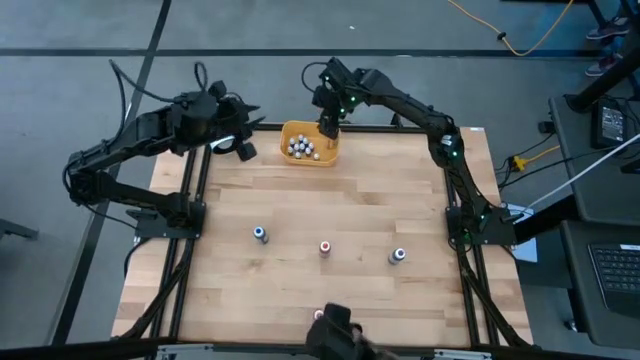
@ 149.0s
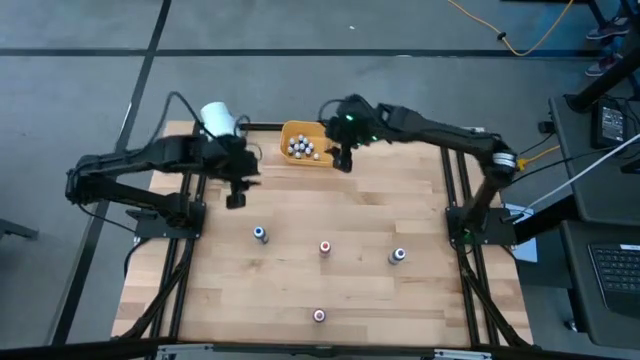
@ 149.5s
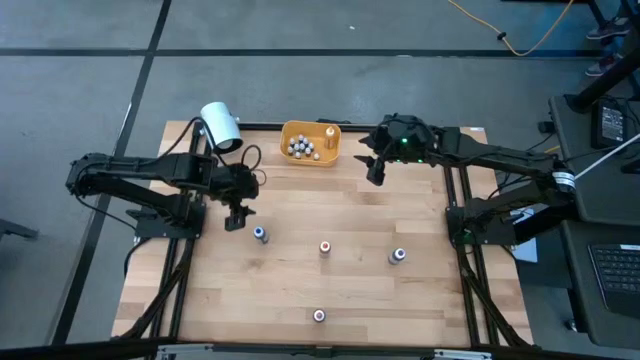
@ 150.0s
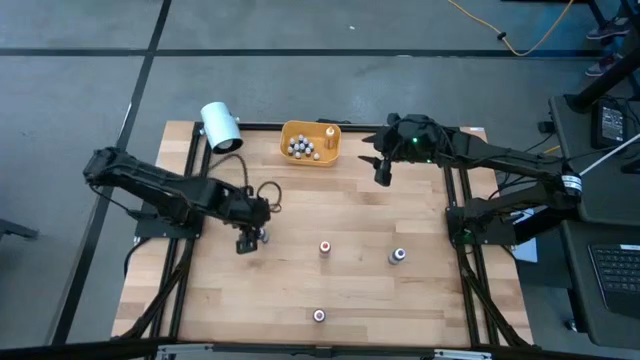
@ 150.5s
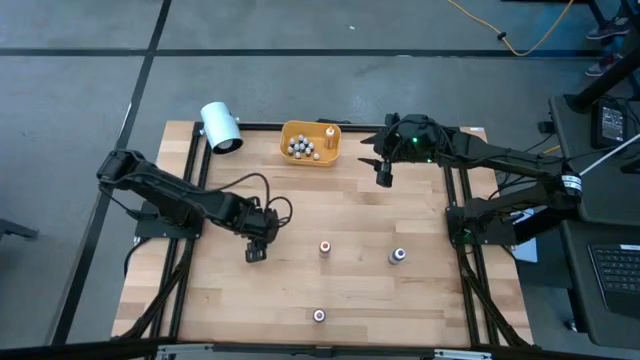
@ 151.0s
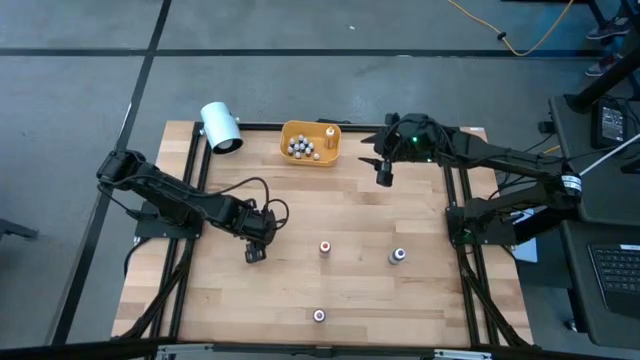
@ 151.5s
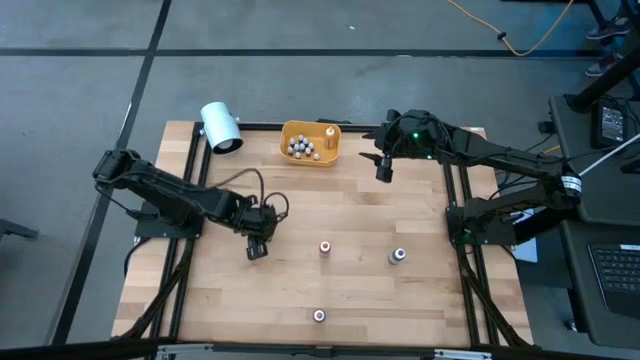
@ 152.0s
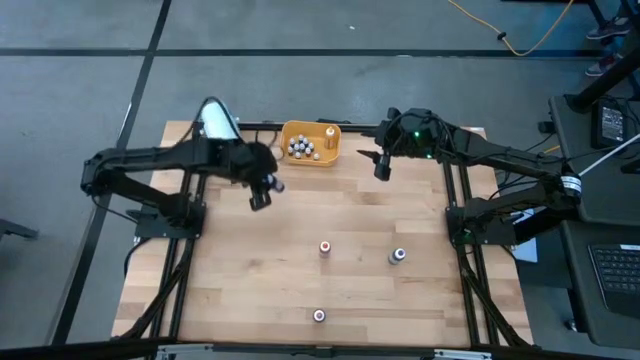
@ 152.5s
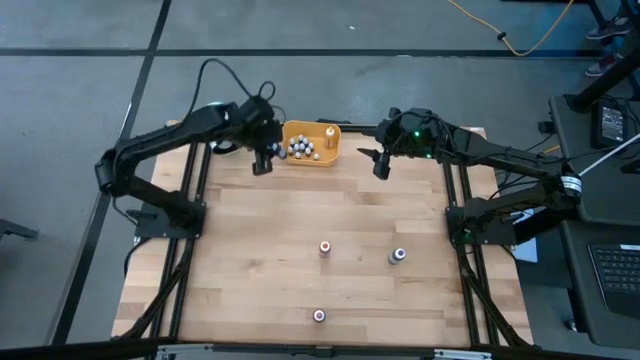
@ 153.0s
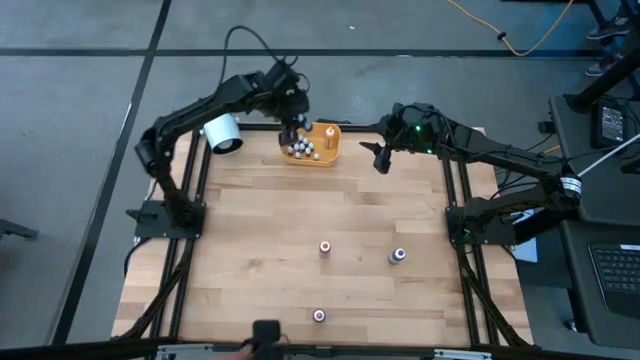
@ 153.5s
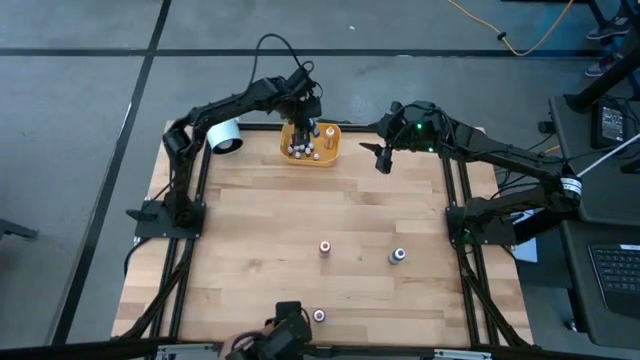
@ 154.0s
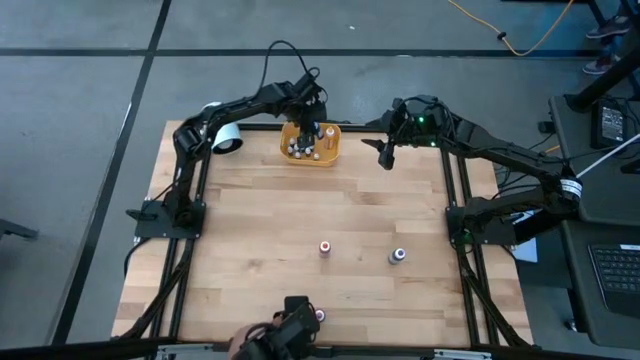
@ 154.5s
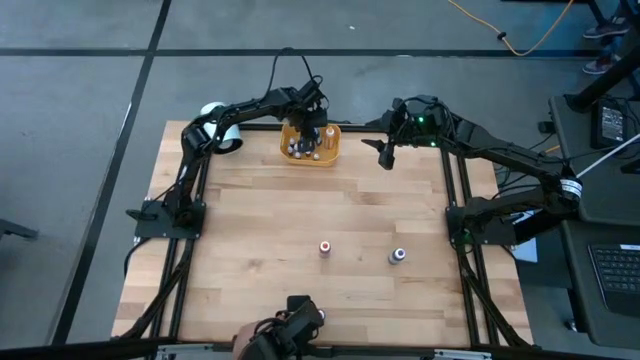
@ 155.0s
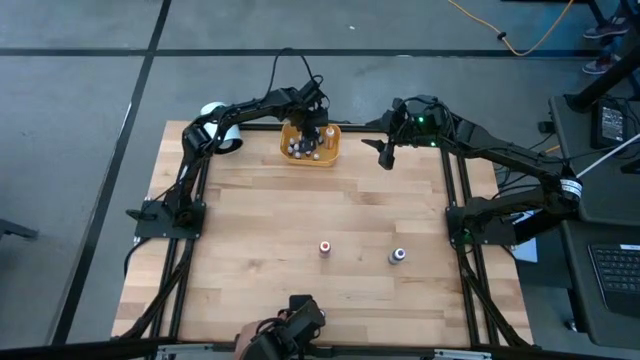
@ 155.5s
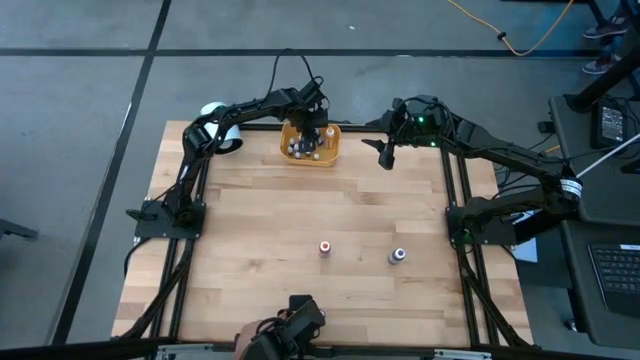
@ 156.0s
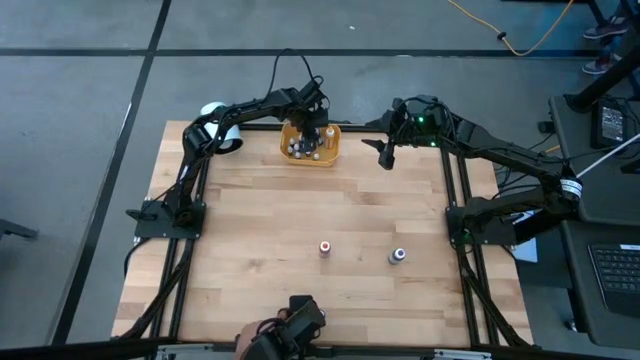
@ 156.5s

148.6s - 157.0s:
Task: Pick & Place food coloring
Put the large blue food coloring bottle into the yellow bin

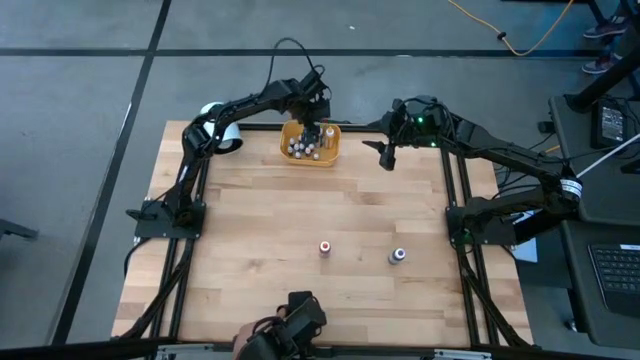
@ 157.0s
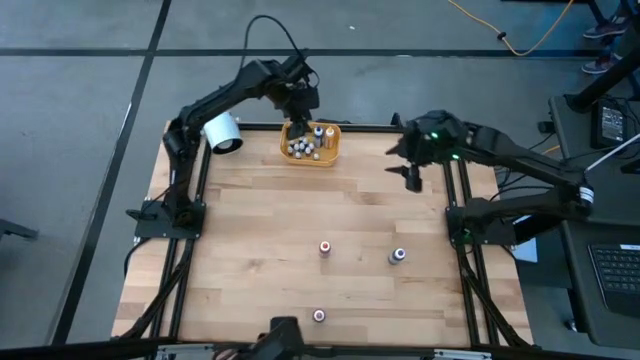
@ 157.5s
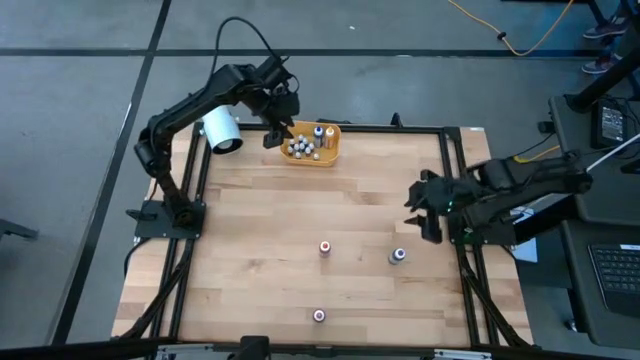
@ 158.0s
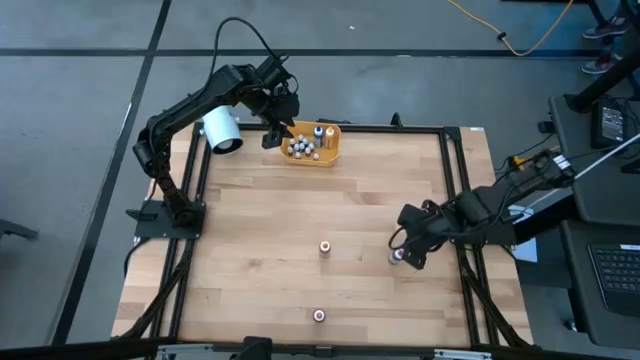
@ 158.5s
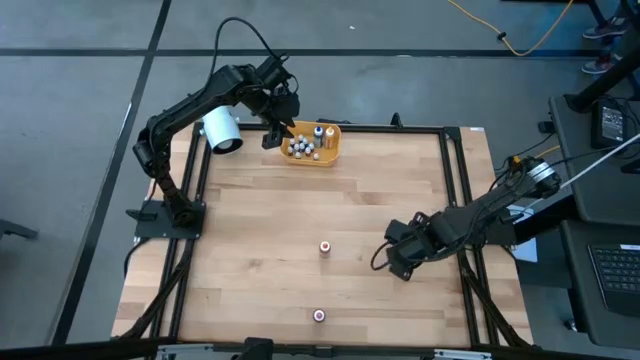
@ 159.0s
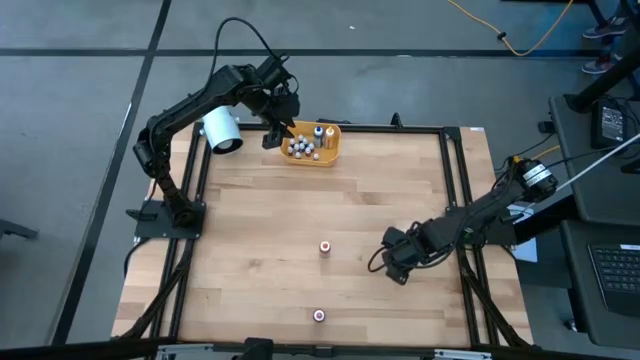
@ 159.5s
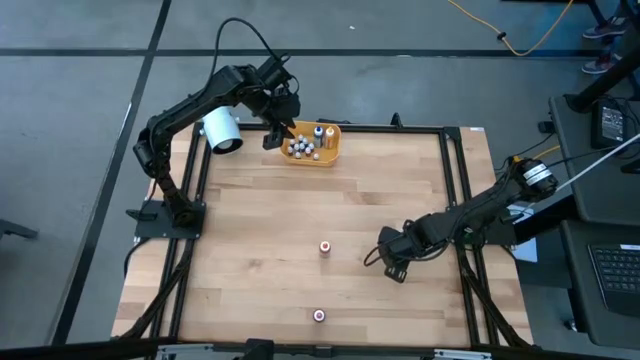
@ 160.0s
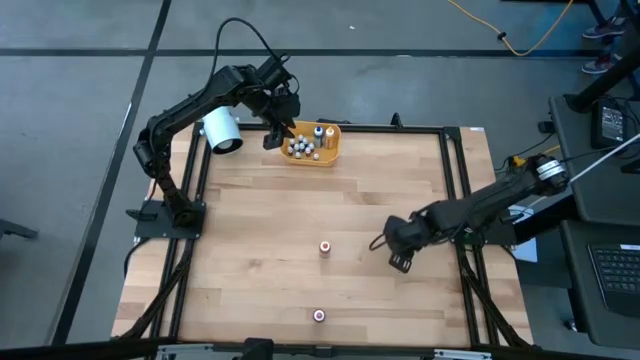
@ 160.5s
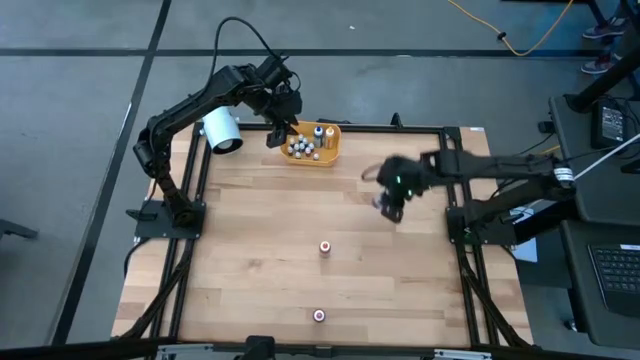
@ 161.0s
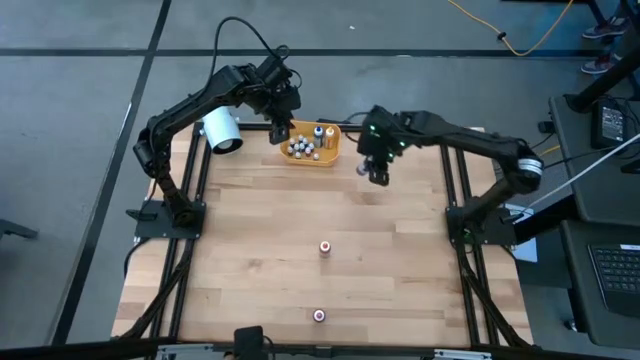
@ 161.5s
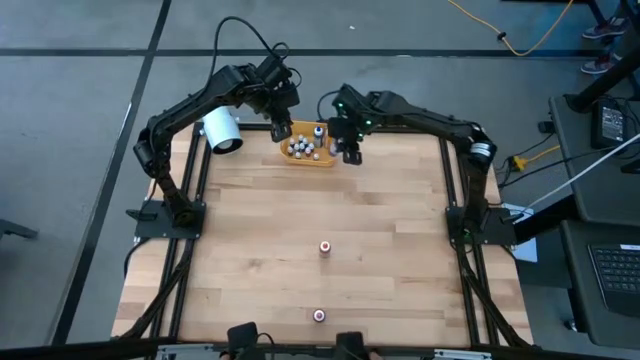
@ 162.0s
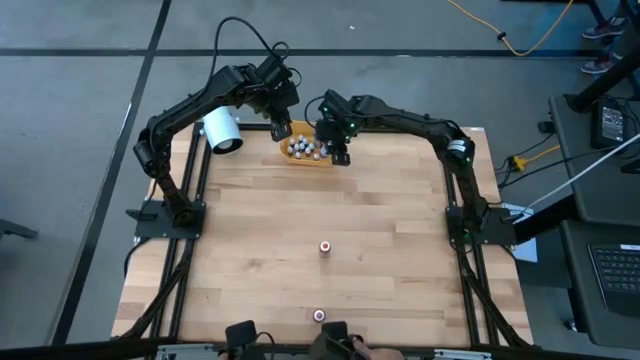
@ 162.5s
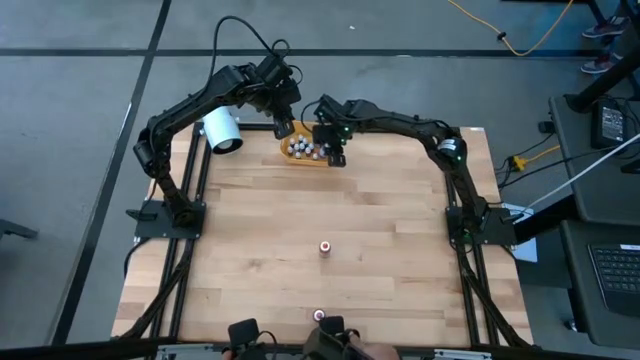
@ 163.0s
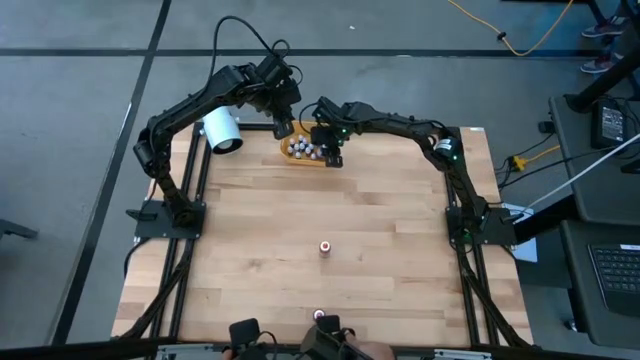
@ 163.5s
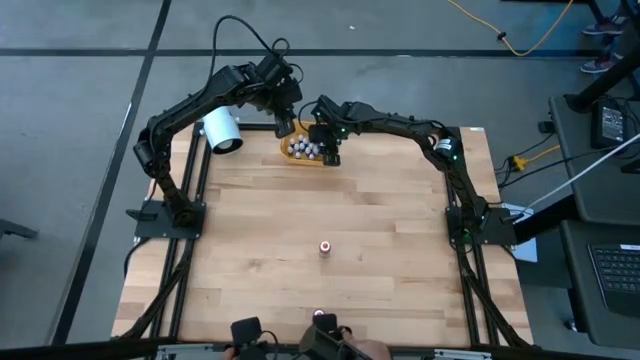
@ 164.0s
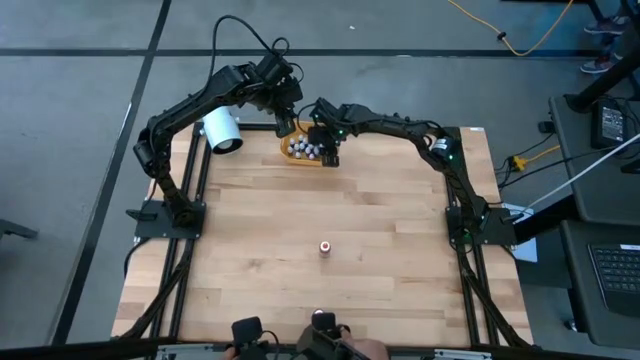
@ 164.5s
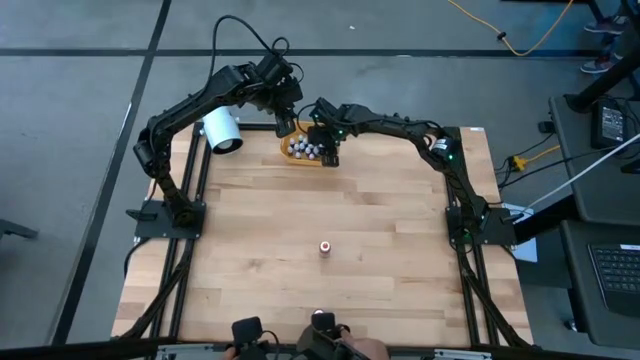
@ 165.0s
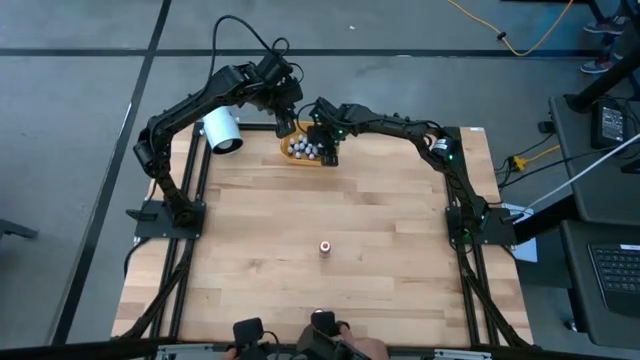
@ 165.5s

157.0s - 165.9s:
Put the large purple food coloring bottle into the yellow bin

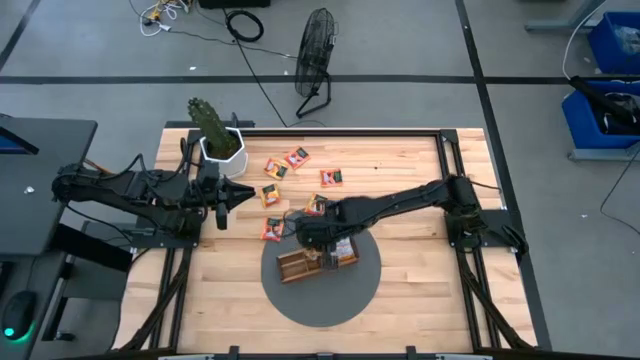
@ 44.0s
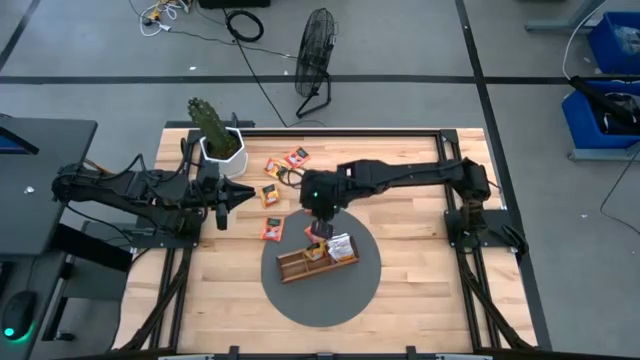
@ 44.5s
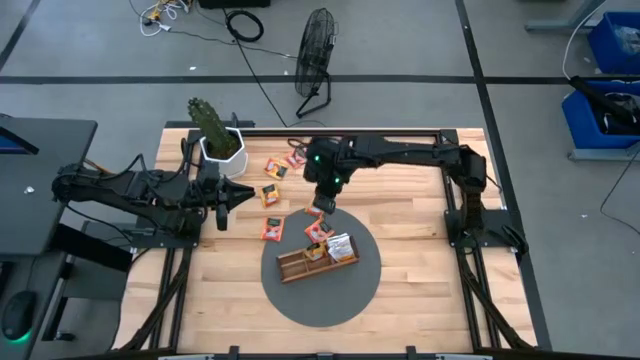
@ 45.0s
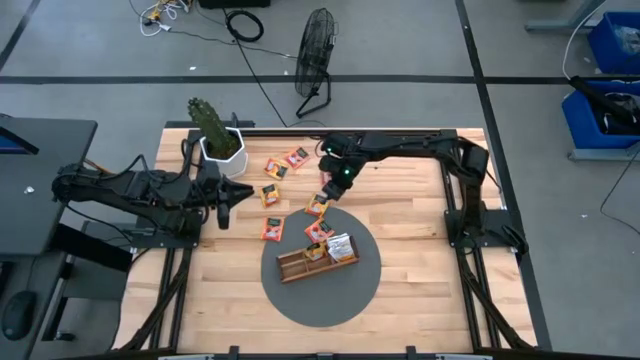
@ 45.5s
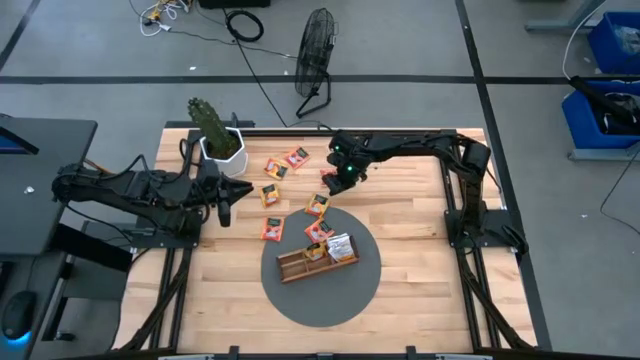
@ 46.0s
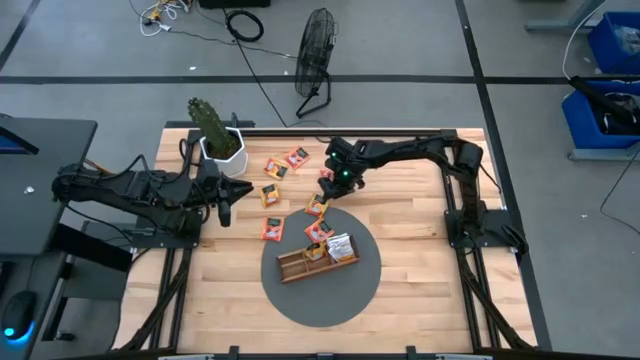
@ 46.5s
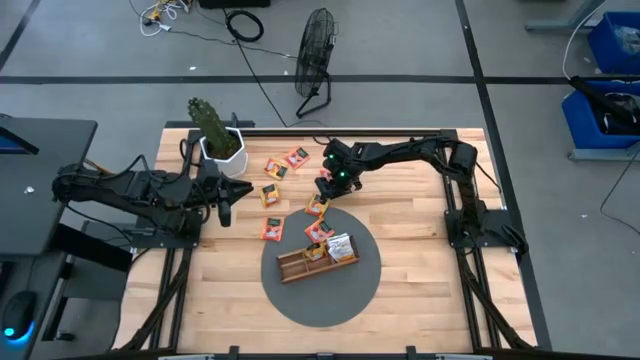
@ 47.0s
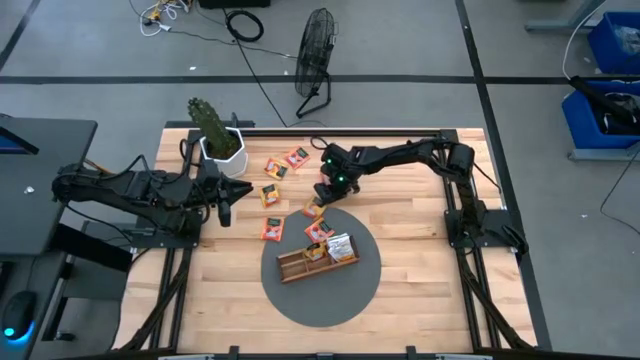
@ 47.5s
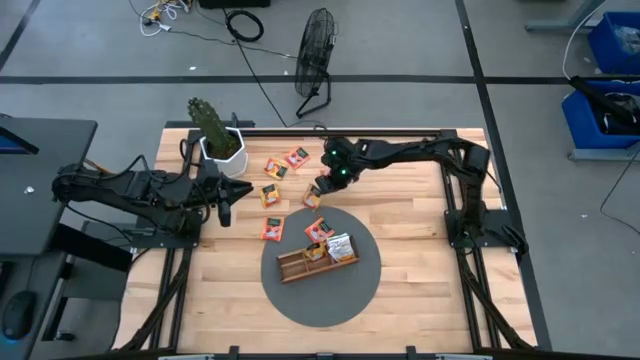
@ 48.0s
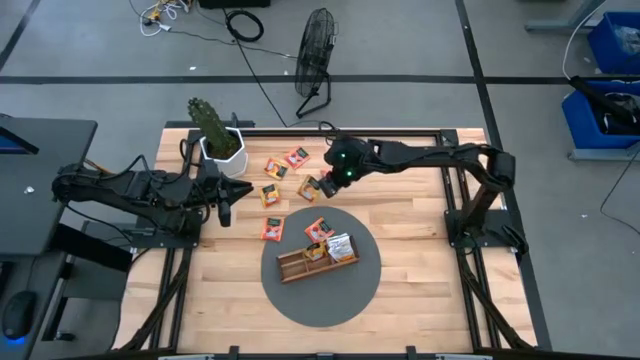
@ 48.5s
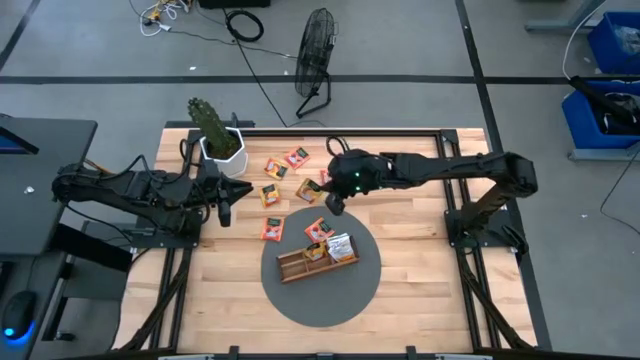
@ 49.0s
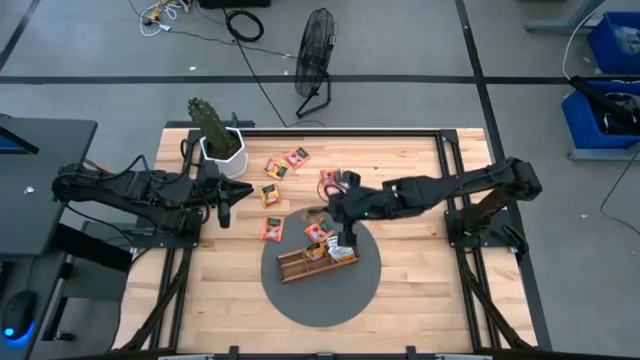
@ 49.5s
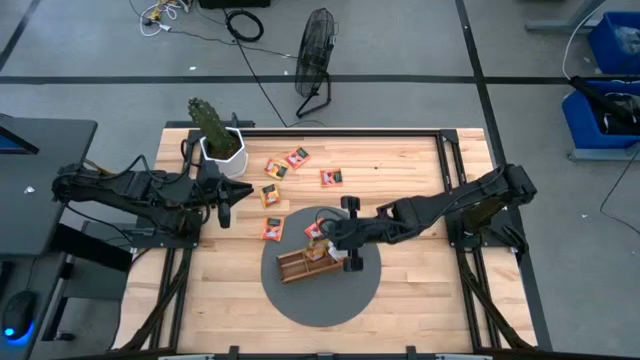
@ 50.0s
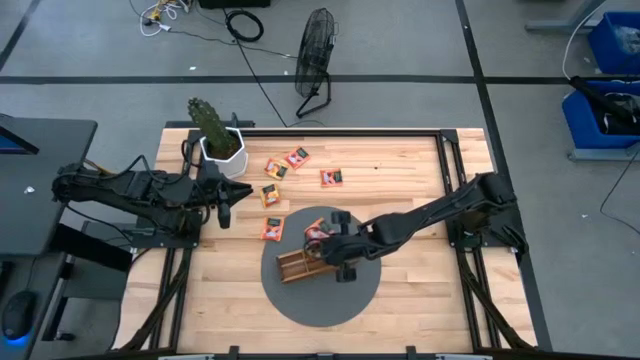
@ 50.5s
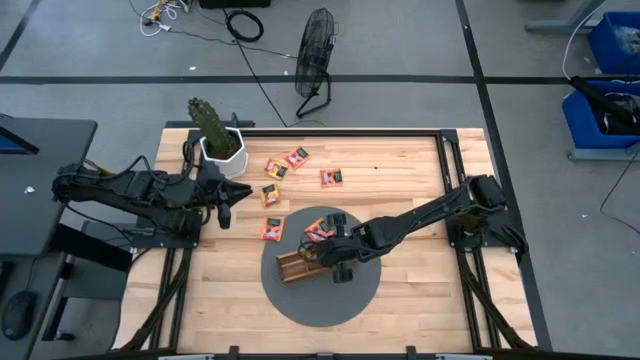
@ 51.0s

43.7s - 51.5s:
Task: Pick & Place Tea
Put the bottom right yellow tea bag into the middle section of the wooden organizer
